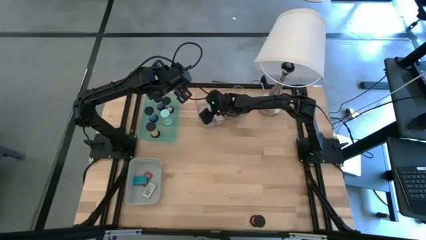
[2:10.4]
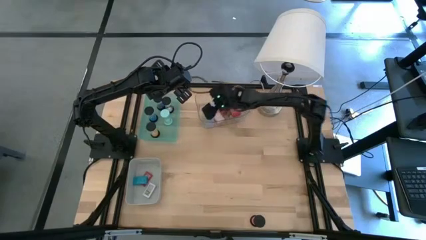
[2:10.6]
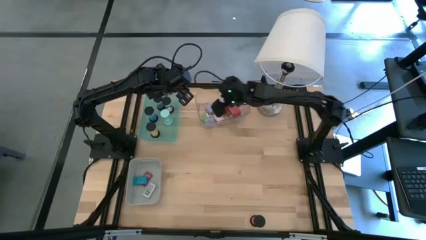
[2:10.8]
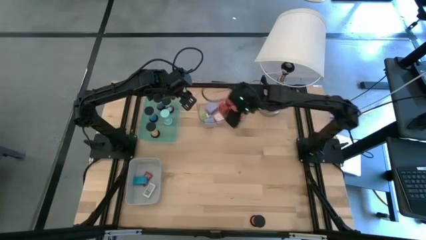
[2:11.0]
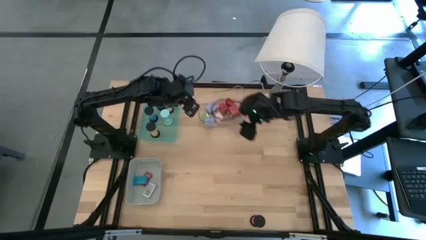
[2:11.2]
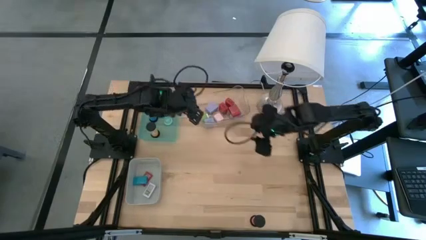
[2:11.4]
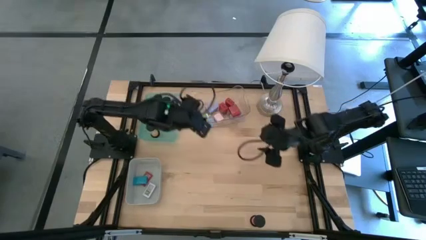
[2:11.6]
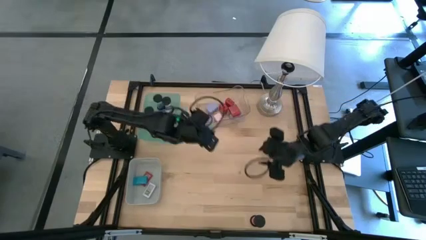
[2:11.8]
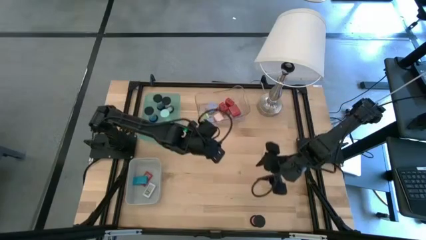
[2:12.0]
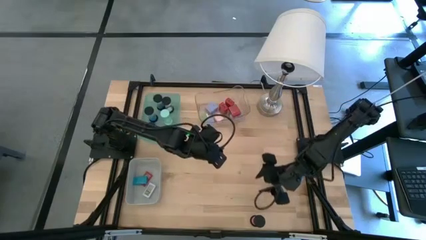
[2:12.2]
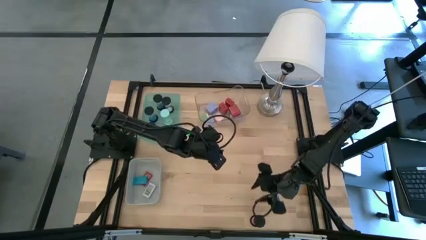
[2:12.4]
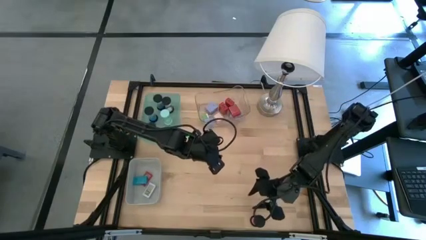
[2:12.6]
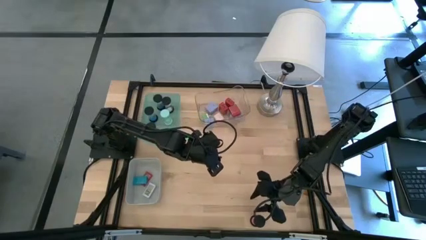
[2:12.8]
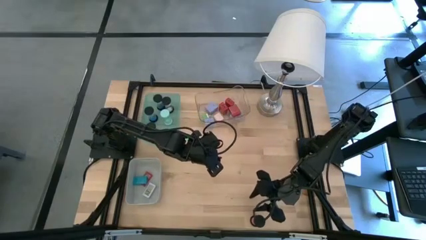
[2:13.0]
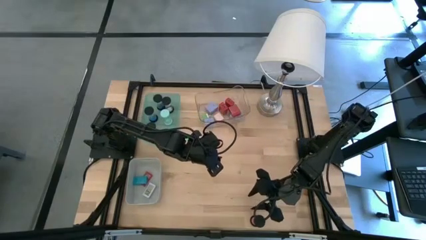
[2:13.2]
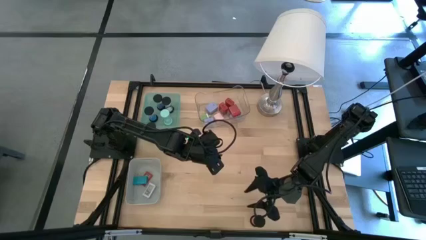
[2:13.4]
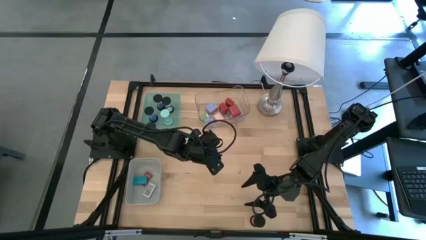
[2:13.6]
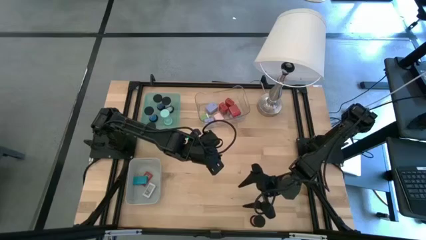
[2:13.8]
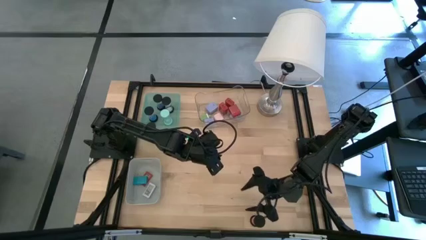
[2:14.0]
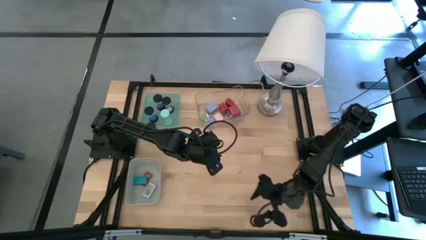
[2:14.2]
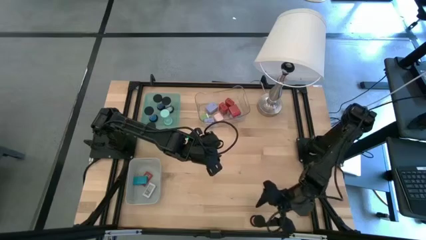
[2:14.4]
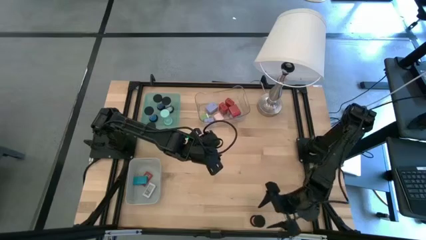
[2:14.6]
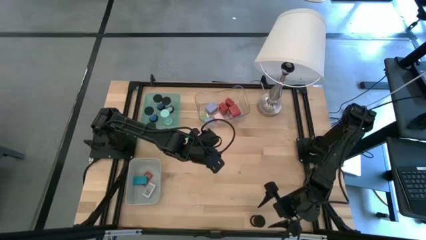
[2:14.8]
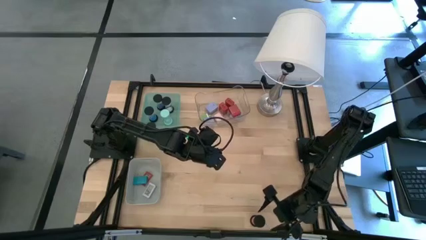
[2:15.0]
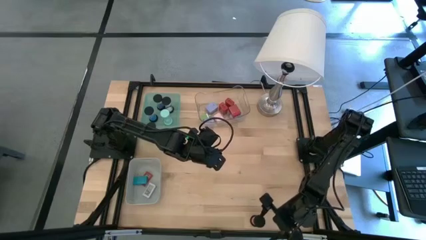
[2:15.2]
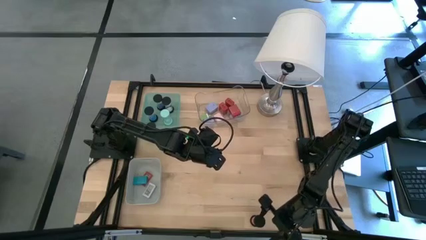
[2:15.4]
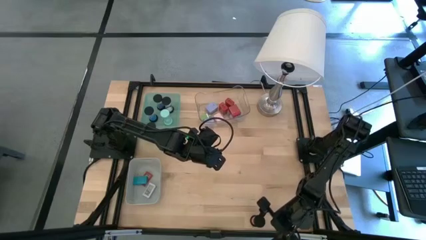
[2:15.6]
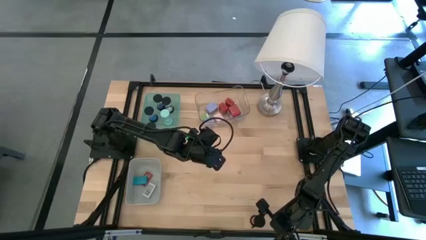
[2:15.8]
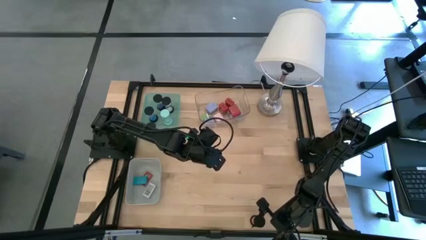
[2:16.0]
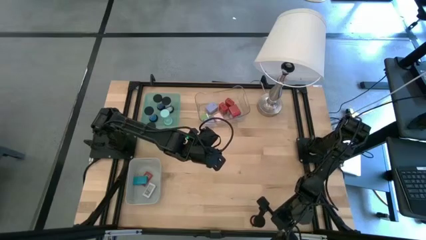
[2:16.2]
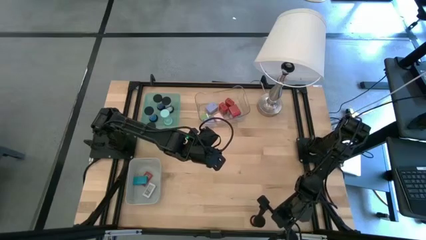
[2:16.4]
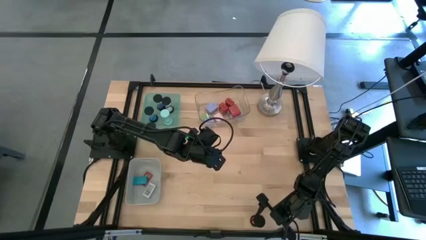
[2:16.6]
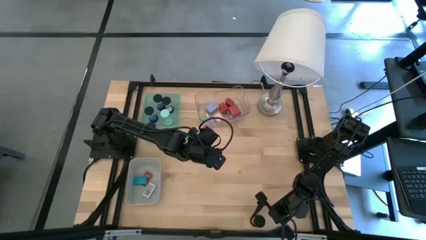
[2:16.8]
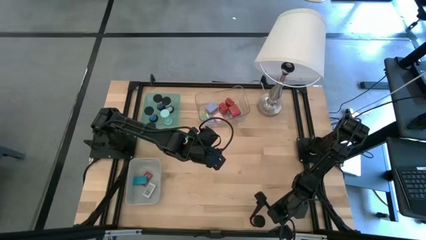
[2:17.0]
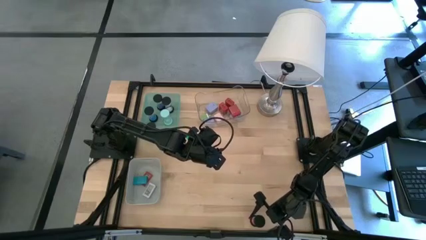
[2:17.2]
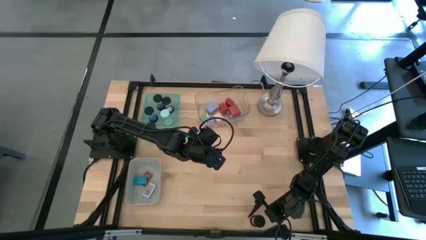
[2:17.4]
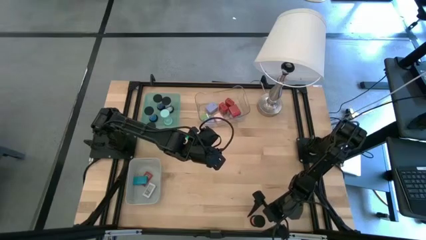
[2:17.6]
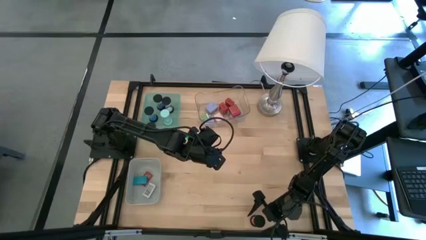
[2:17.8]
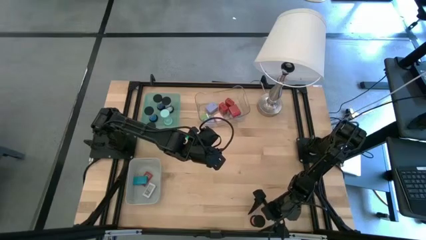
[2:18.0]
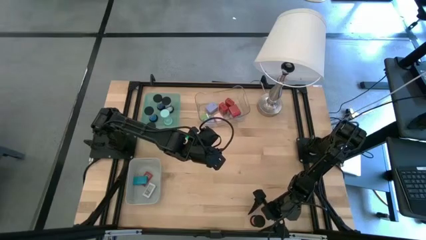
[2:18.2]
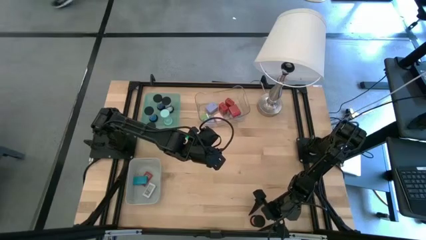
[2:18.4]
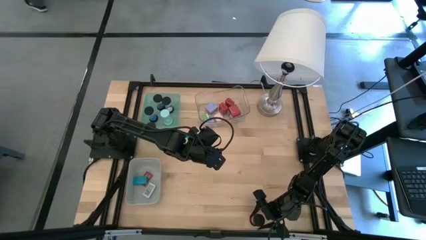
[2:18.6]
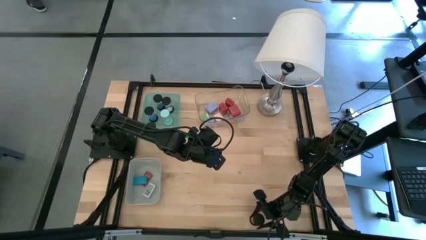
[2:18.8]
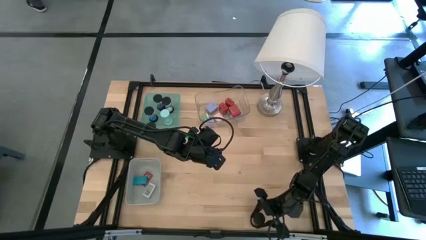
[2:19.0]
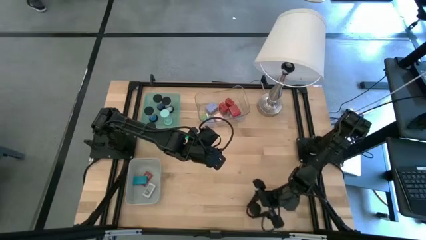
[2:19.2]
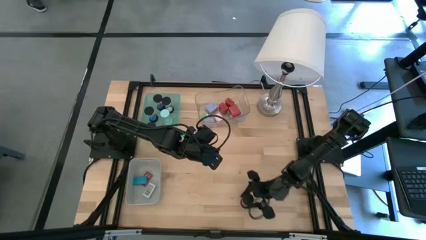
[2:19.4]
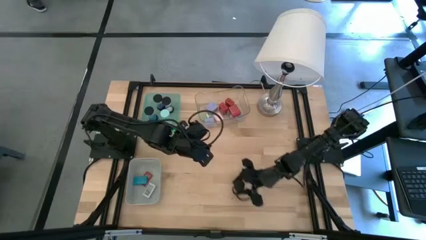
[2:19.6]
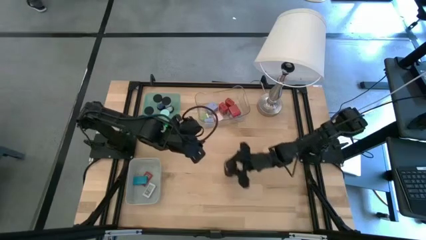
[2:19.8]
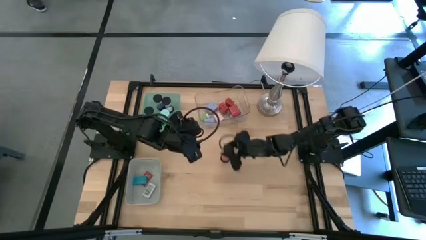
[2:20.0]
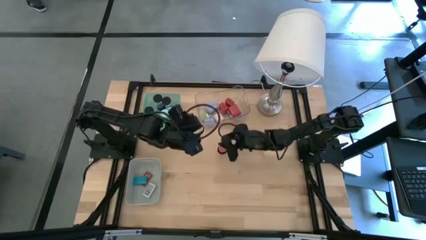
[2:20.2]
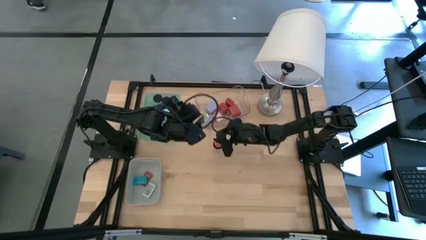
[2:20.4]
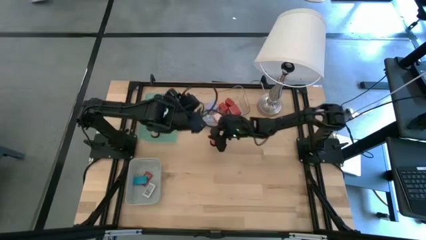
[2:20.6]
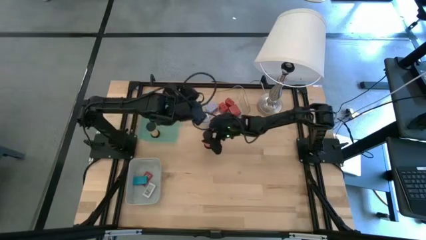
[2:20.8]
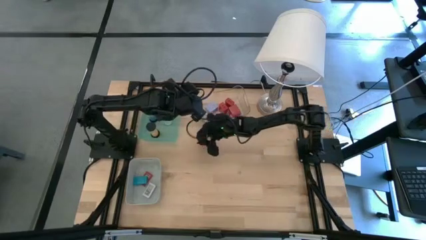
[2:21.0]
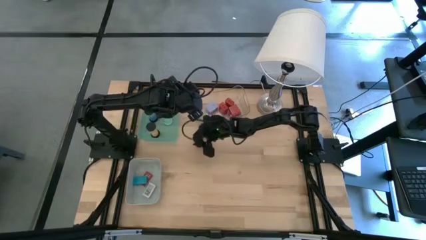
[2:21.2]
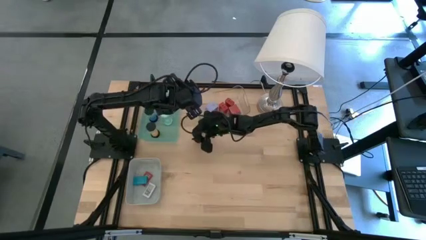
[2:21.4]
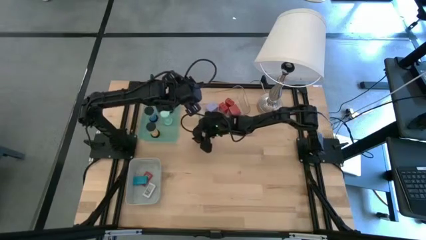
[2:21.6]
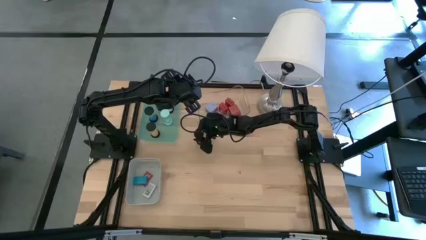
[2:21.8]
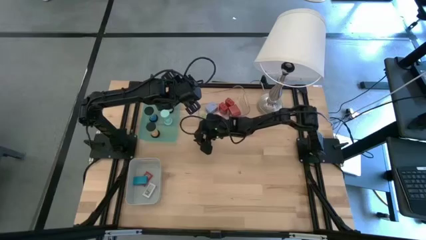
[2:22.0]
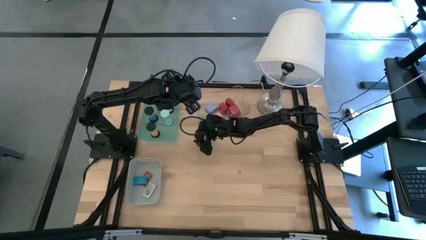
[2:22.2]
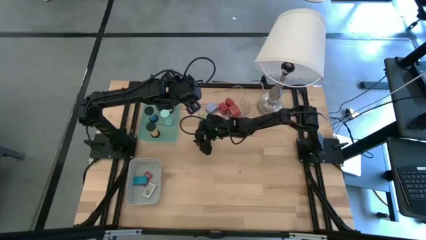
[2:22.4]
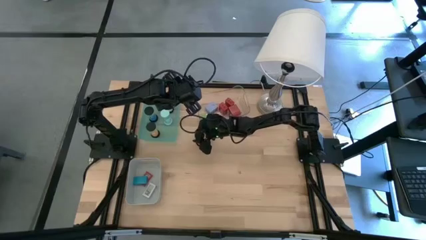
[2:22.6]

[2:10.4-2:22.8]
Task: Pick & Place Office items
Put the red hourglass into the green bin

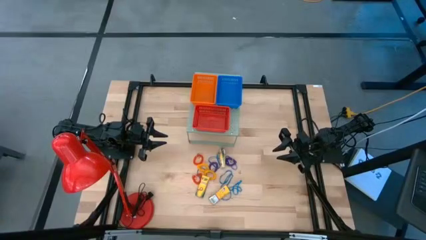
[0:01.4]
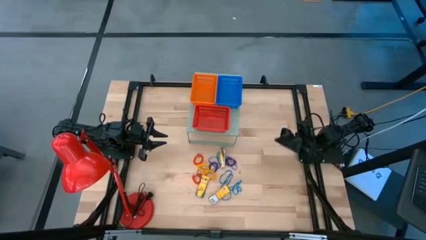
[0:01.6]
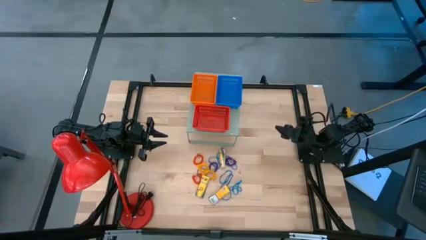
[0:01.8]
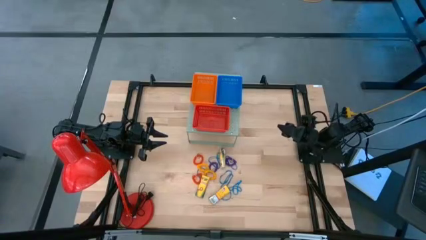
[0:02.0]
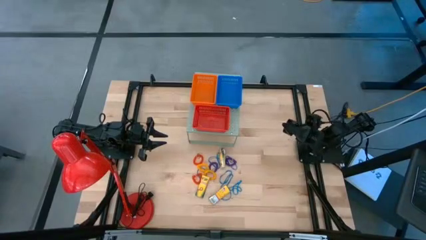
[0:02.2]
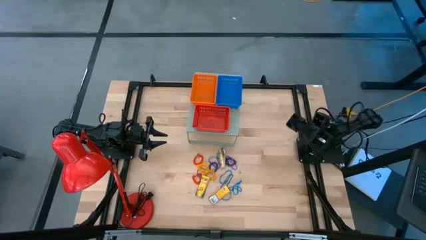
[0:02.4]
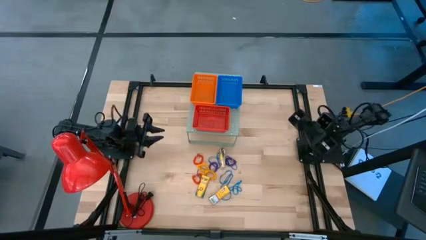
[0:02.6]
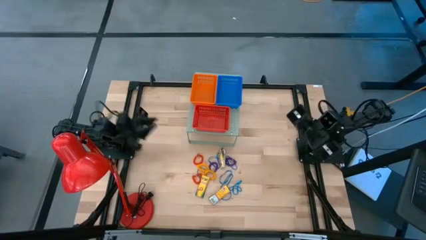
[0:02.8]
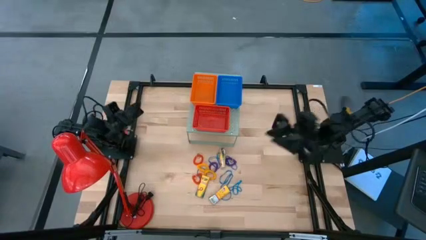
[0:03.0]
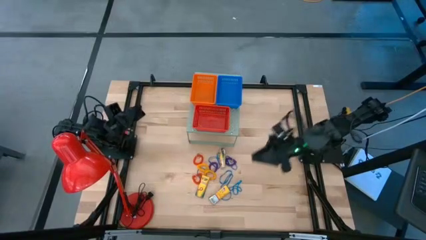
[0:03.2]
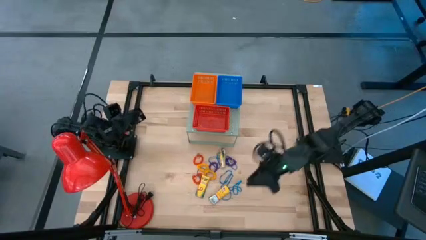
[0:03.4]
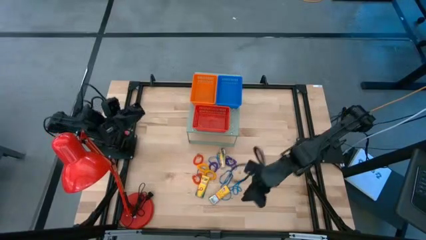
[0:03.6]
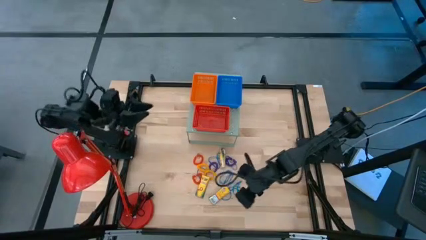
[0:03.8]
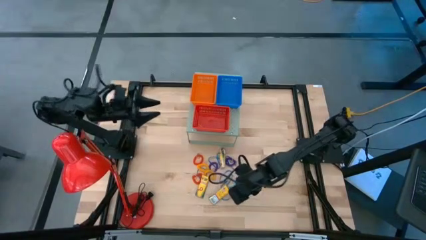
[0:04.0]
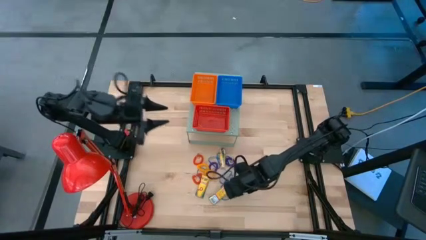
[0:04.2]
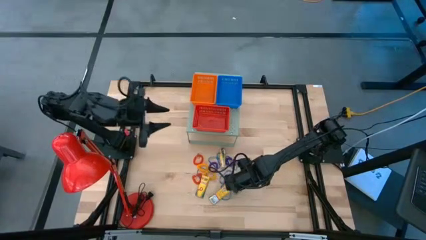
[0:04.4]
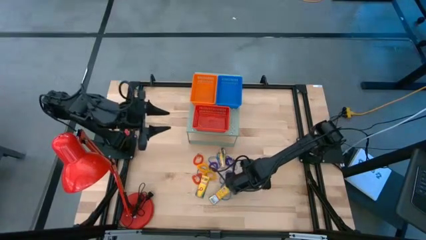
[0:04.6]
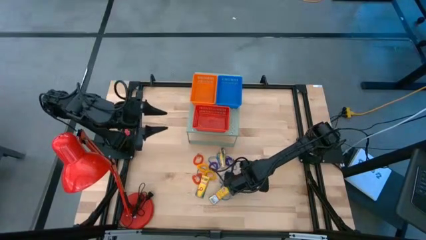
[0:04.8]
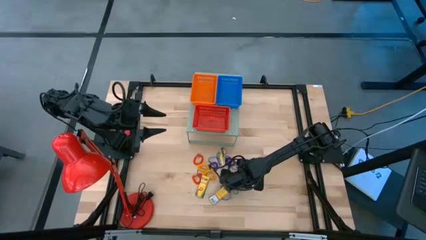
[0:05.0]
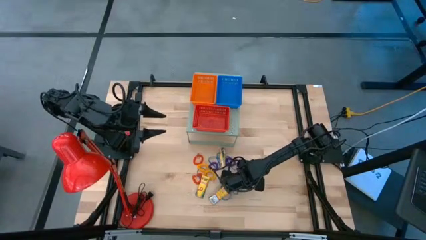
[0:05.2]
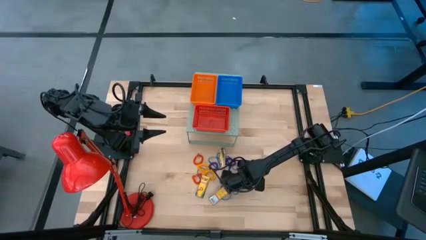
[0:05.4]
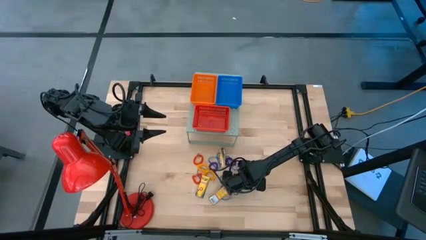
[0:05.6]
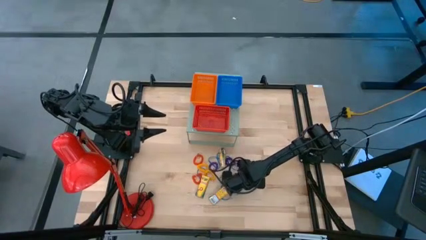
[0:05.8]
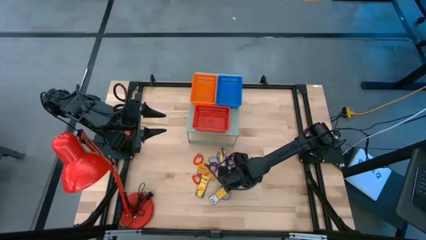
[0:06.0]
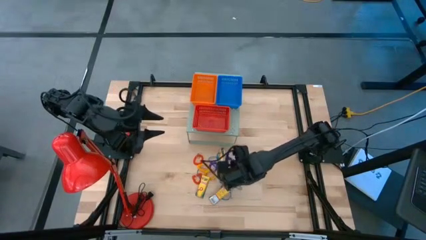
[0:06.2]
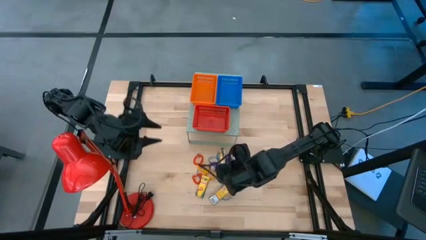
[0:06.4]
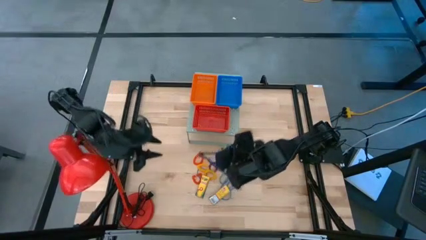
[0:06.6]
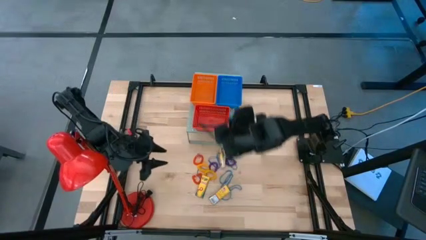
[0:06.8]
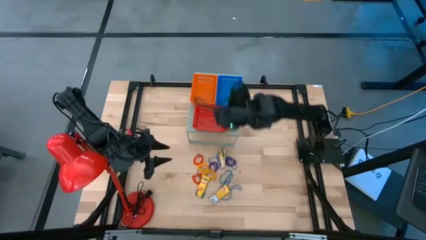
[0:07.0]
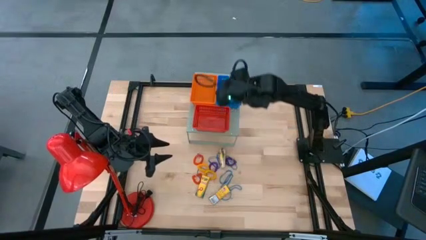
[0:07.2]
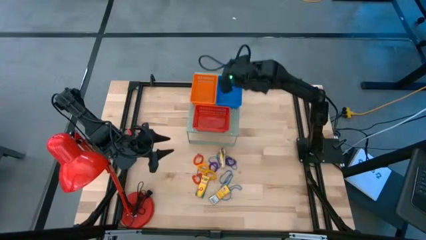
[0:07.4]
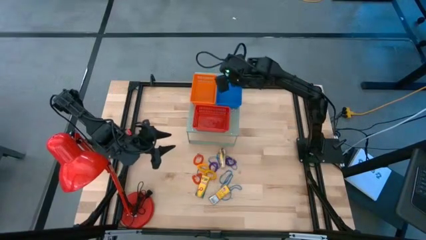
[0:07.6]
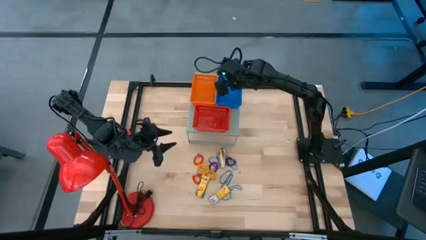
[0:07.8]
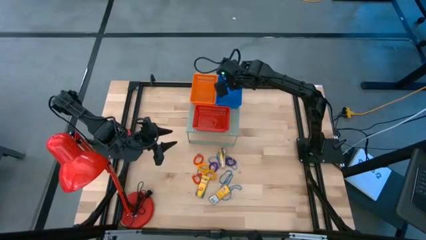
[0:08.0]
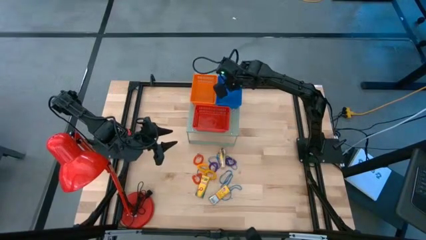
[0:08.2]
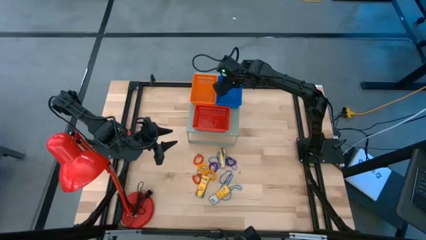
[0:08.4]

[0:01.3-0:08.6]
Task: Pick & Place Office Desk Supplies
Put the blue rubber band into the blue bin
